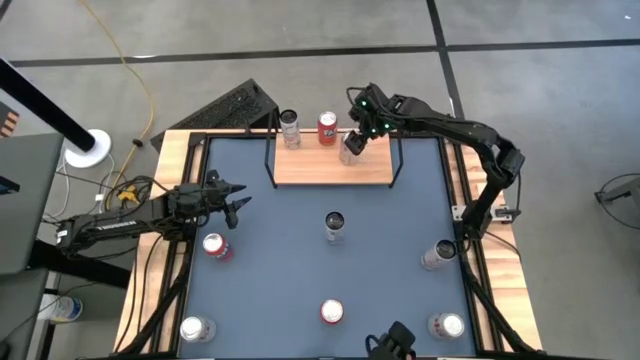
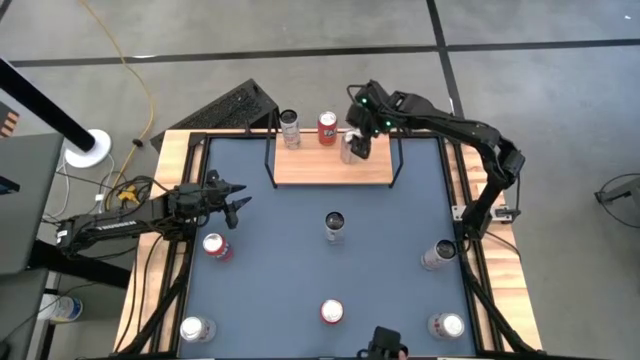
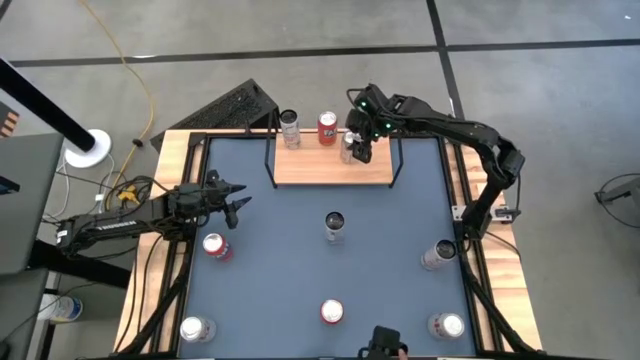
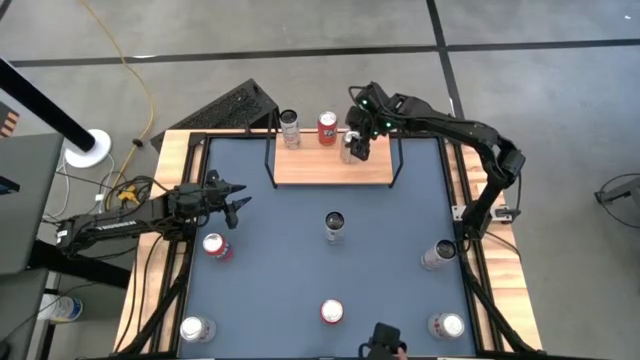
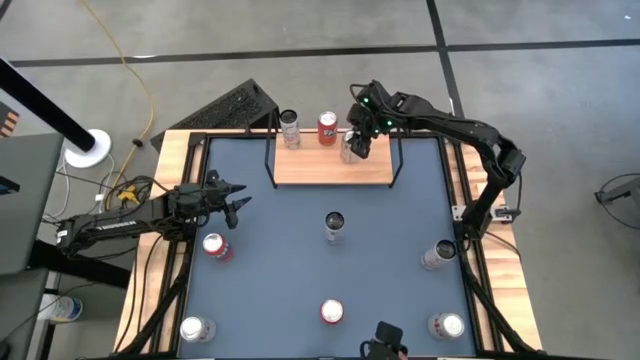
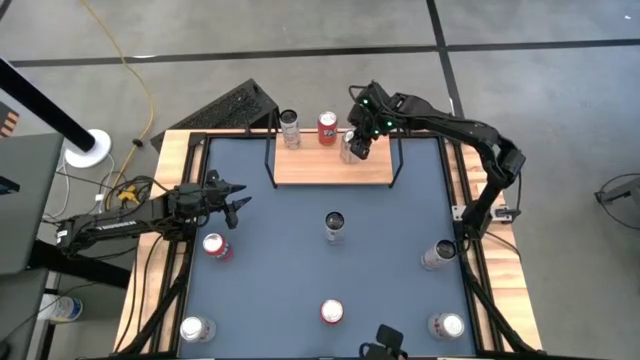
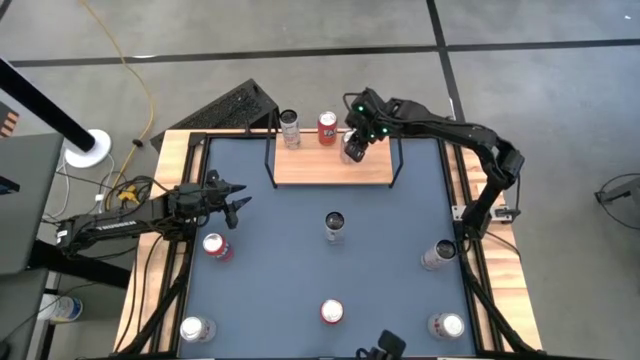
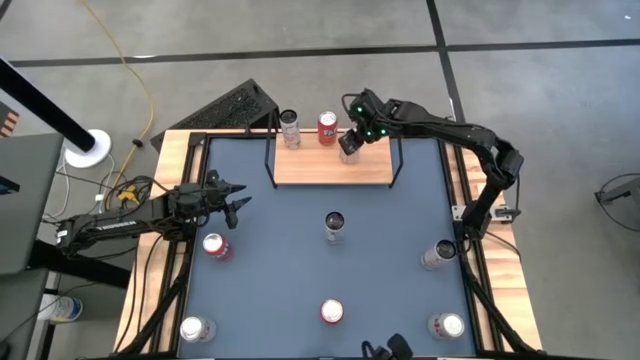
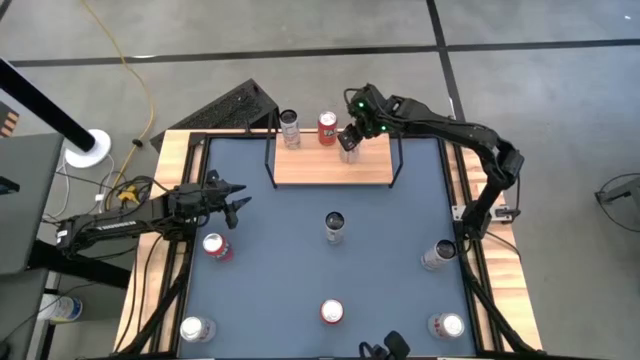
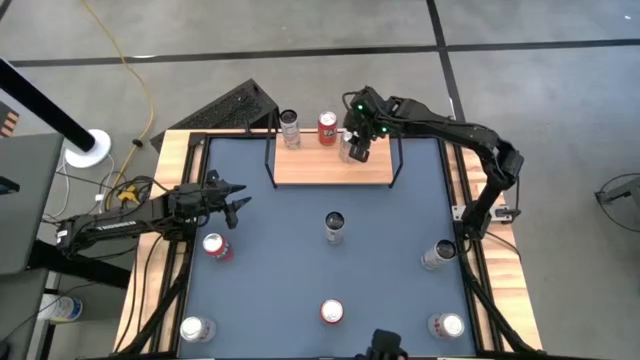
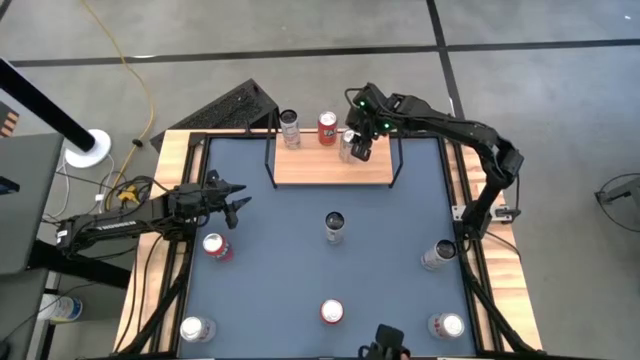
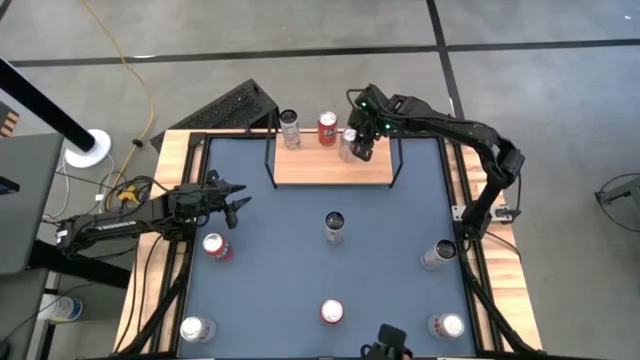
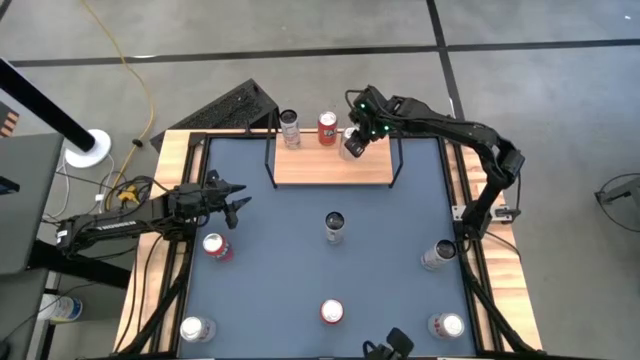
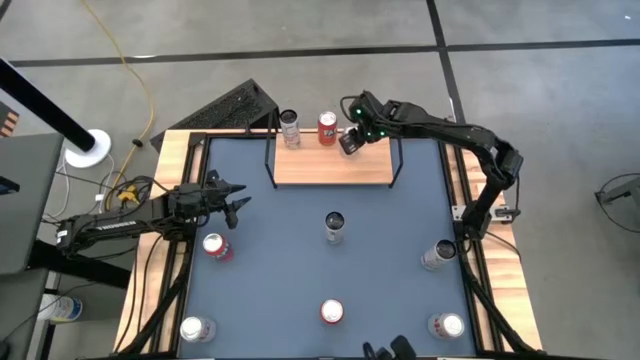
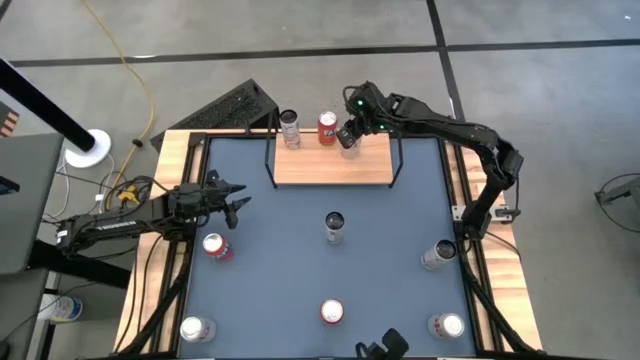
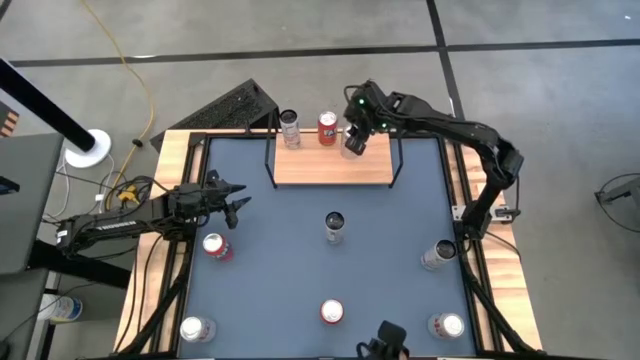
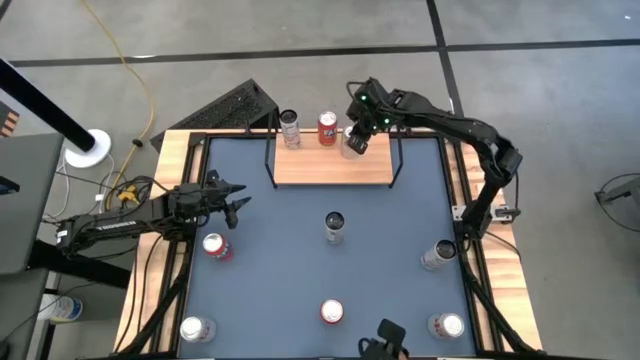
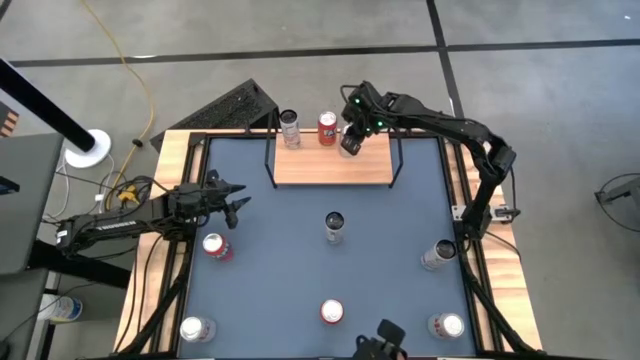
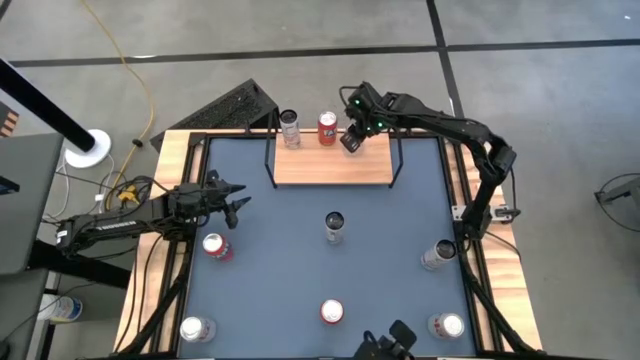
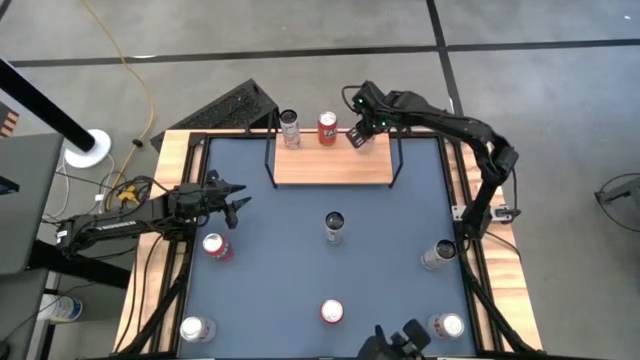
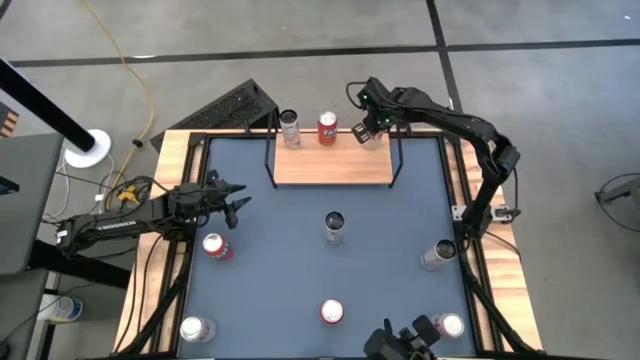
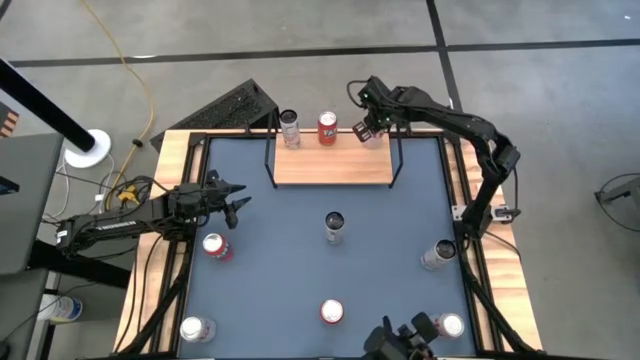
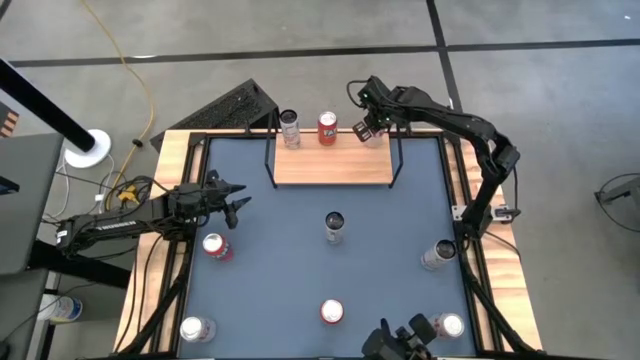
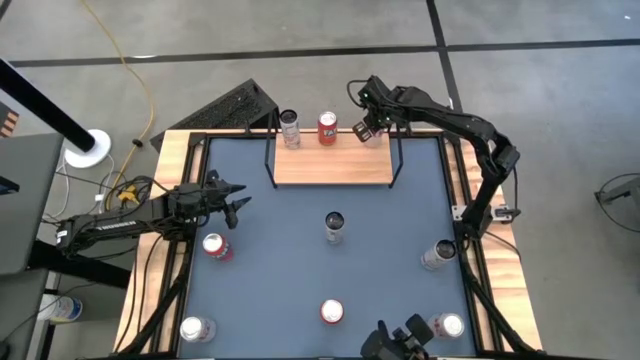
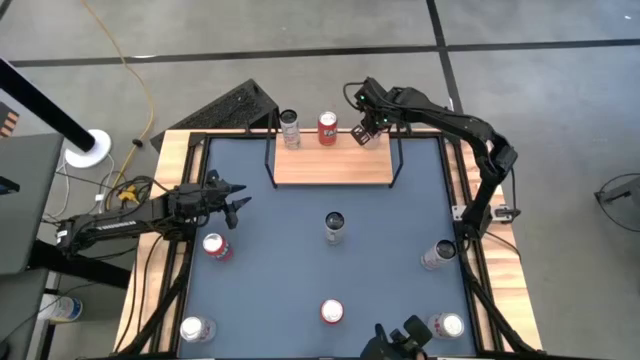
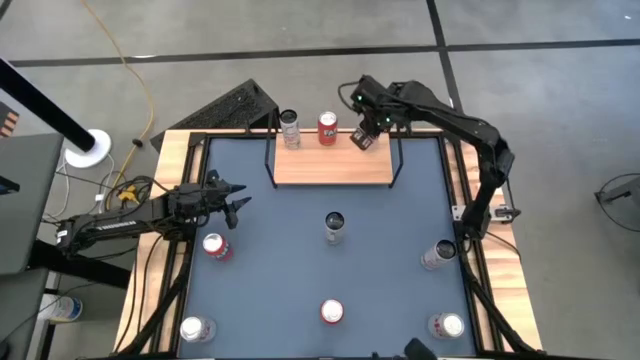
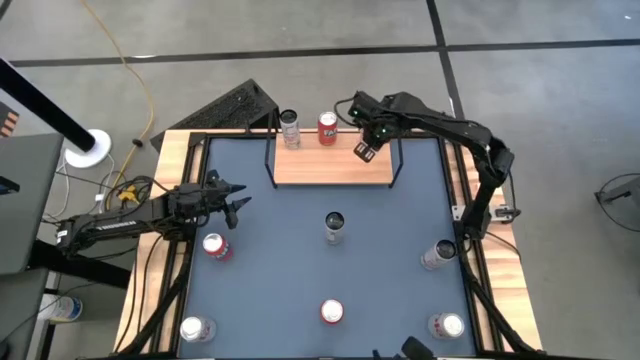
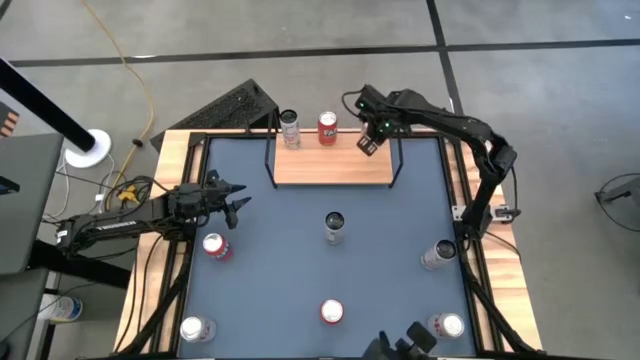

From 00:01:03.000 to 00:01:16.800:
Task: Place canned beverage on shelf
Put the top red-silver soda can on the shelf

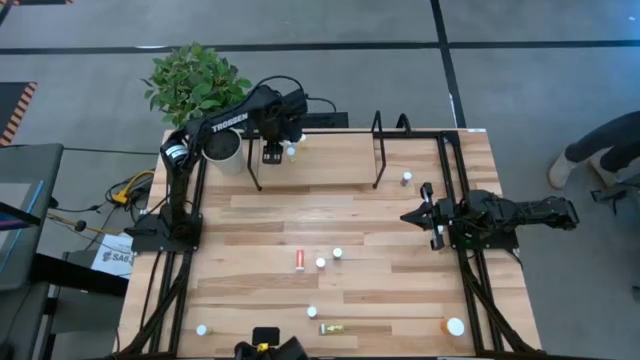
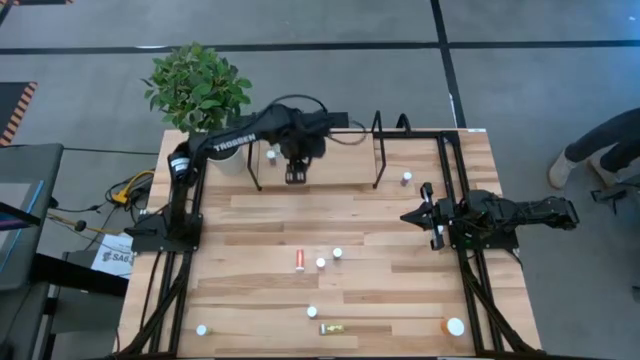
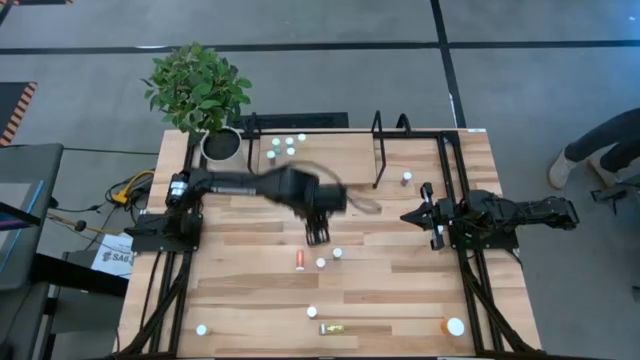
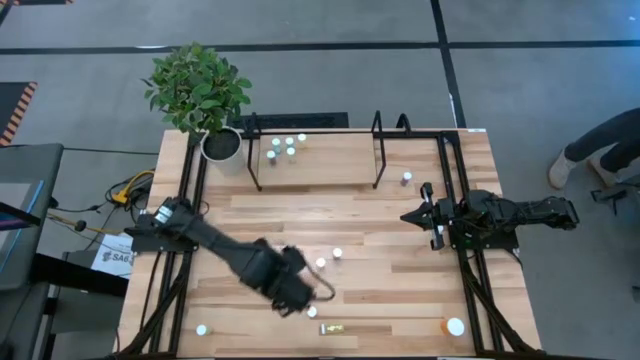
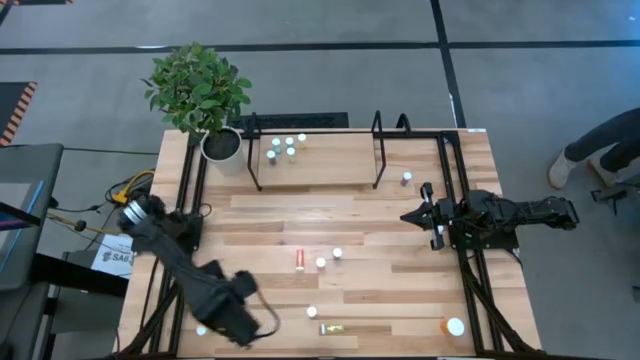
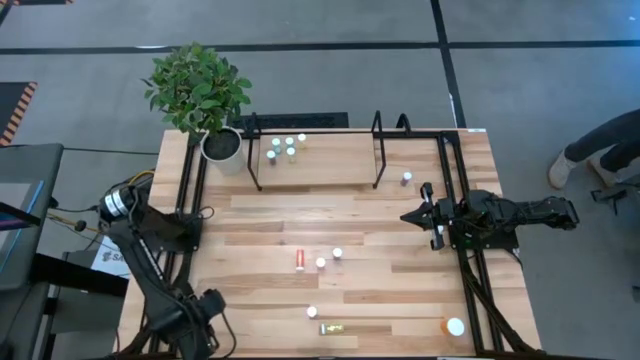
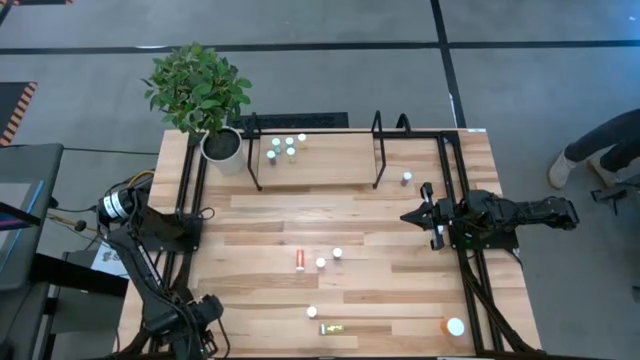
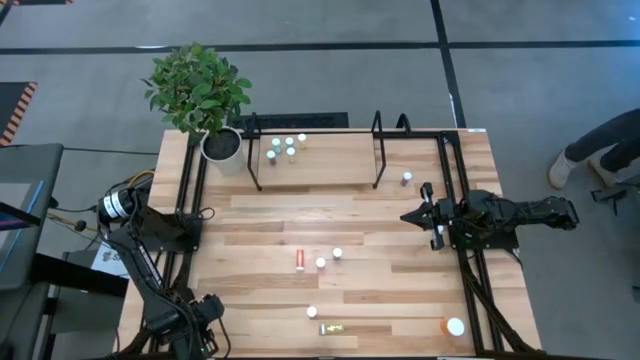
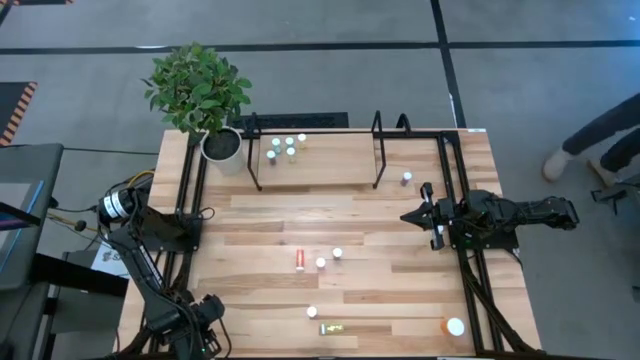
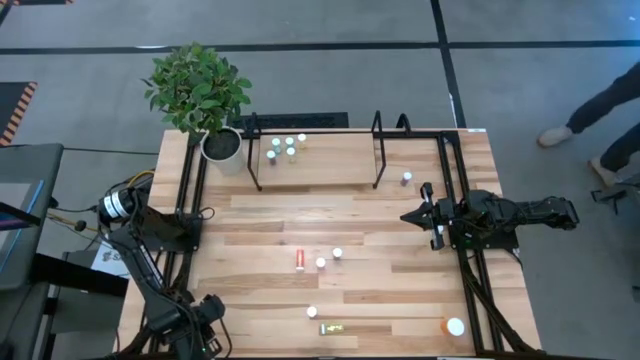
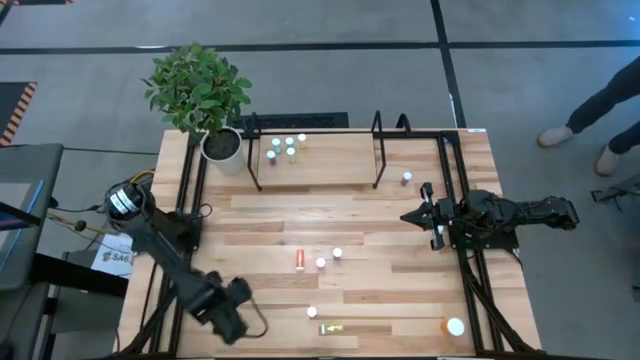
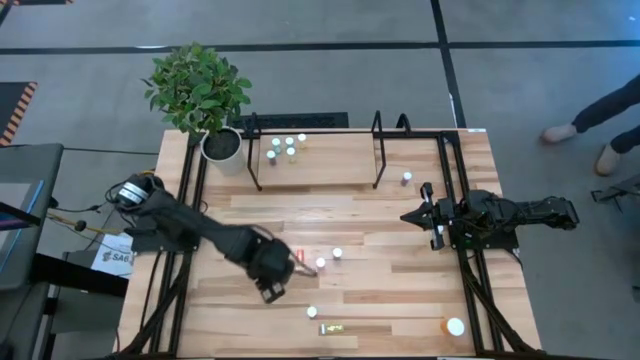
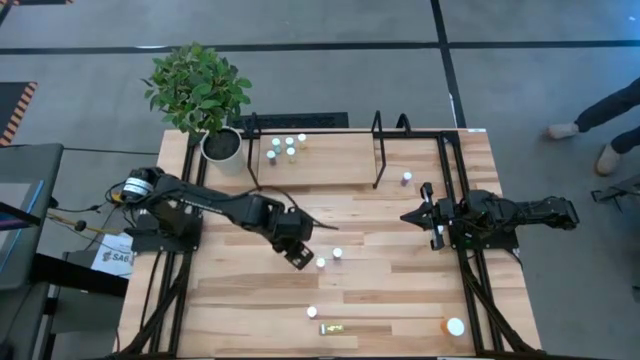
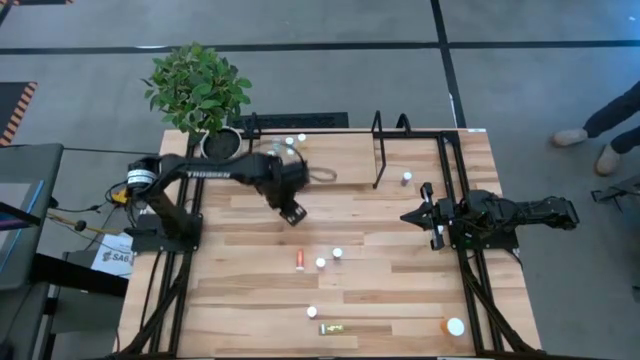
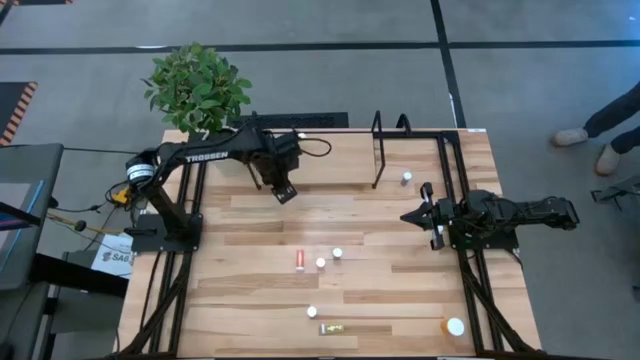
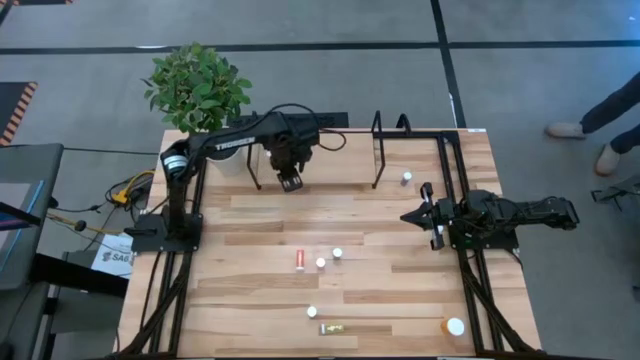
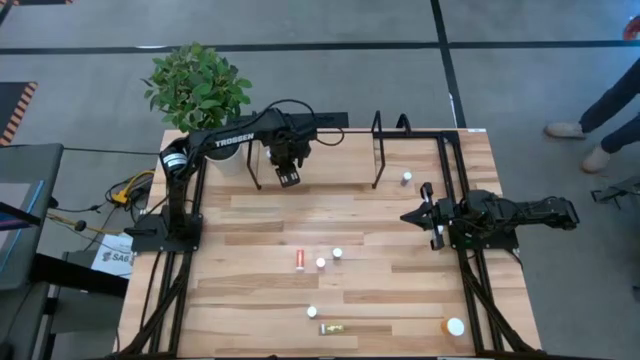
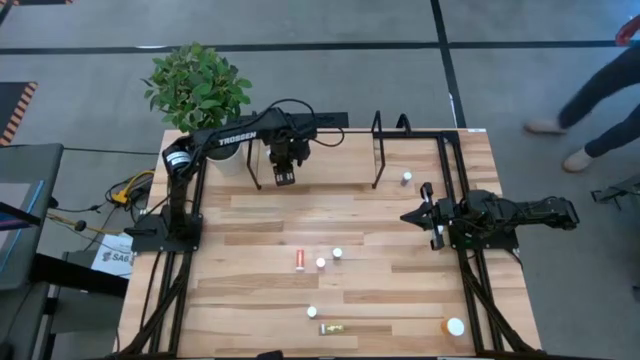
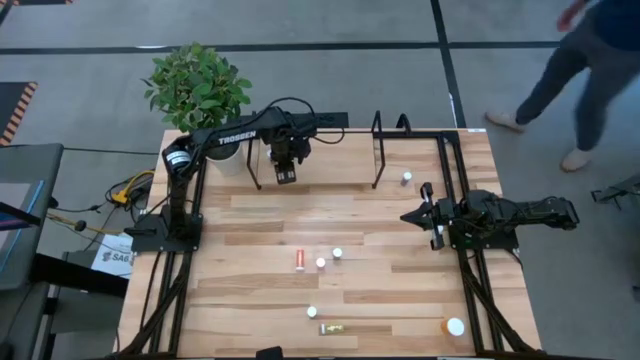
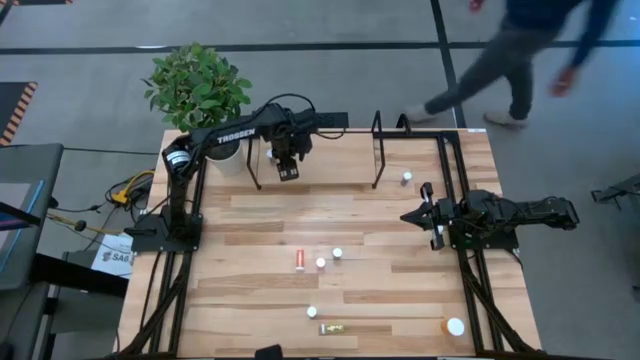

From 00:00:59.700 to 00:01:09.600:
Task: Pick and place medicine bottles onto shelf by color
Put the yellow pill bottle on the shelf
